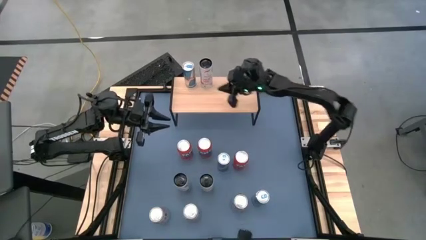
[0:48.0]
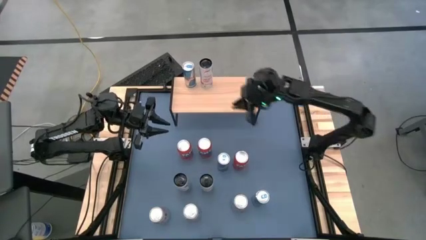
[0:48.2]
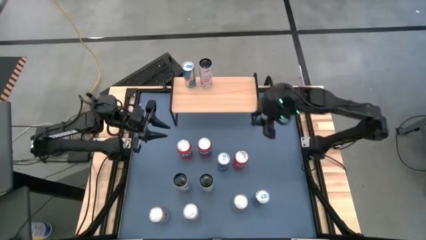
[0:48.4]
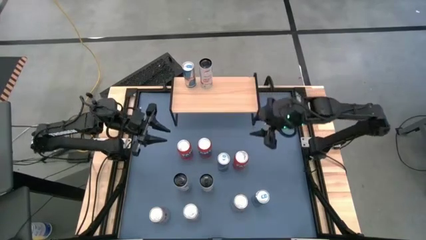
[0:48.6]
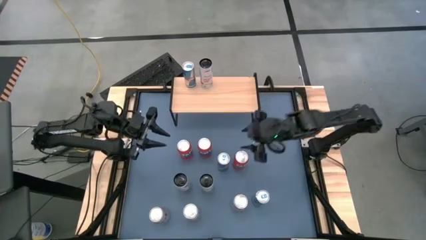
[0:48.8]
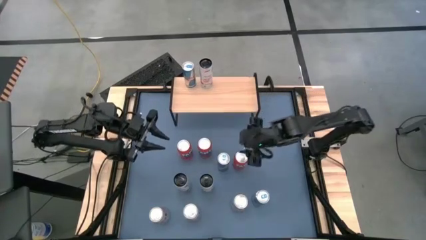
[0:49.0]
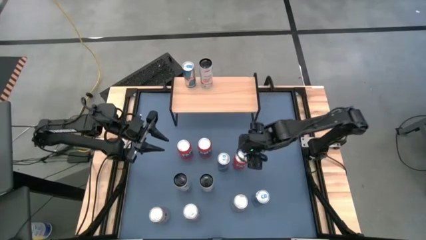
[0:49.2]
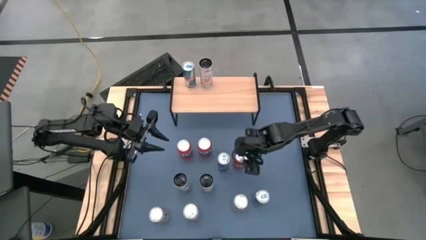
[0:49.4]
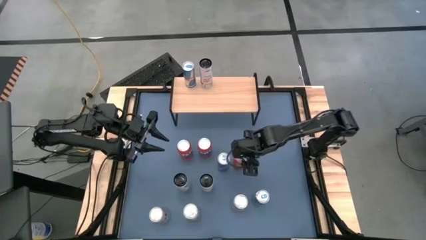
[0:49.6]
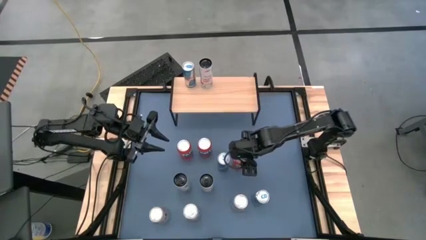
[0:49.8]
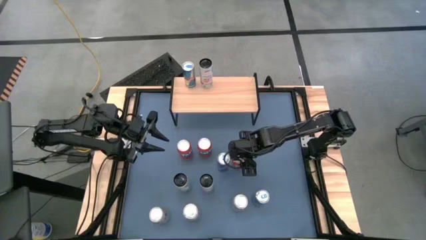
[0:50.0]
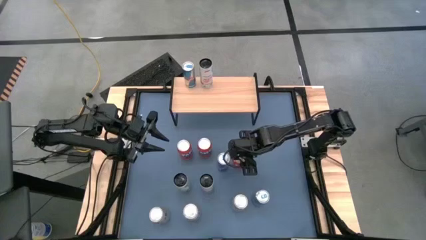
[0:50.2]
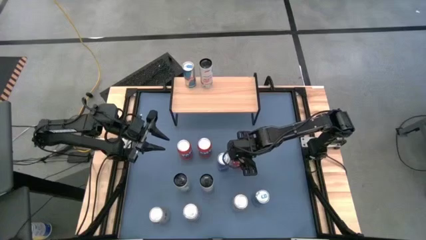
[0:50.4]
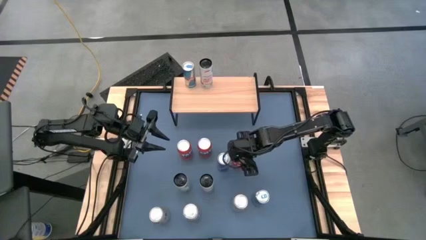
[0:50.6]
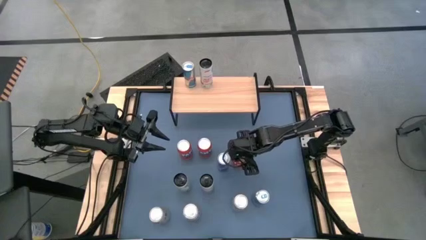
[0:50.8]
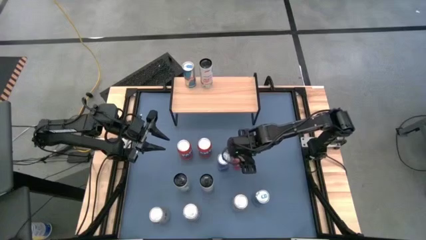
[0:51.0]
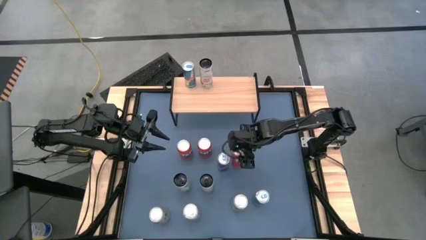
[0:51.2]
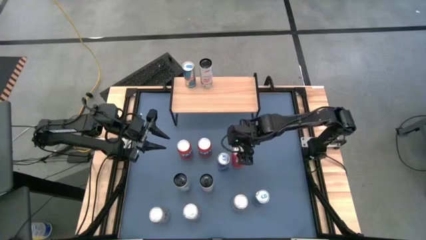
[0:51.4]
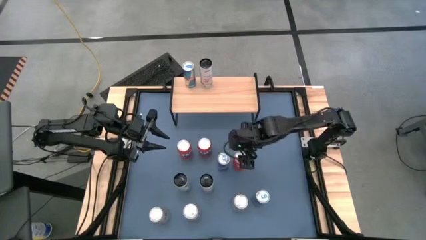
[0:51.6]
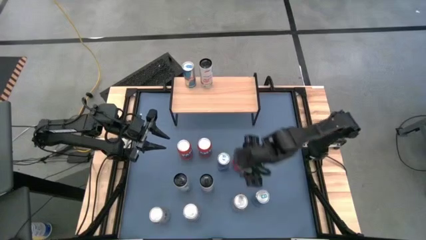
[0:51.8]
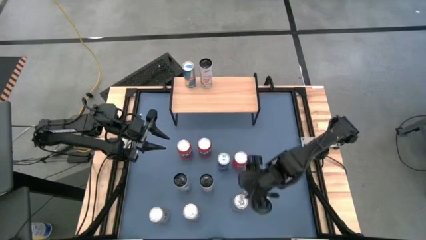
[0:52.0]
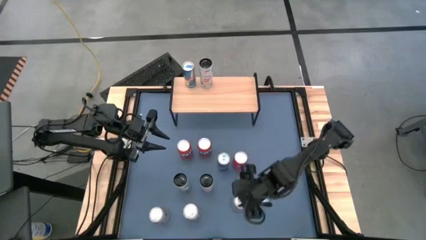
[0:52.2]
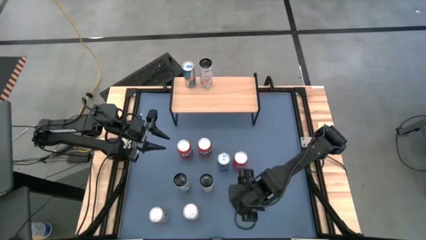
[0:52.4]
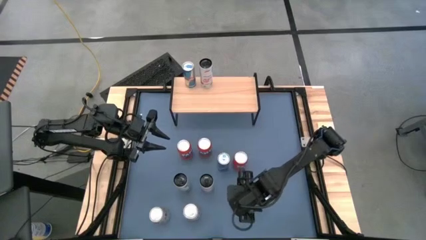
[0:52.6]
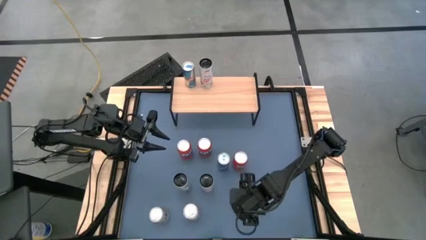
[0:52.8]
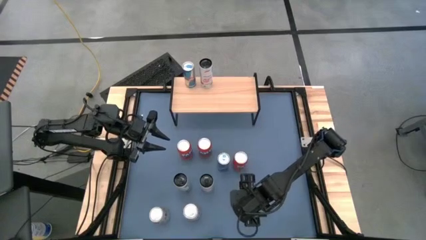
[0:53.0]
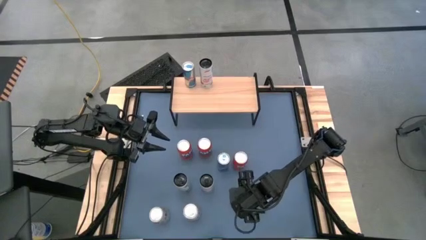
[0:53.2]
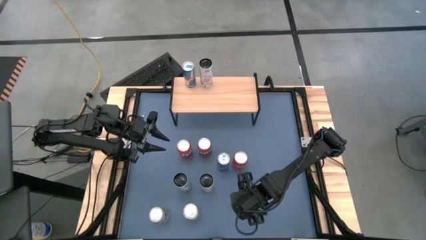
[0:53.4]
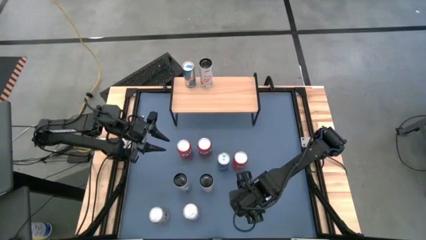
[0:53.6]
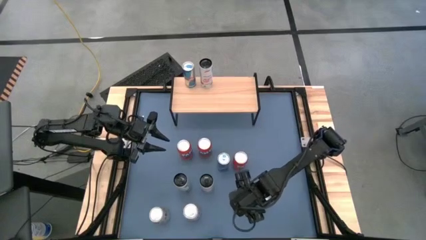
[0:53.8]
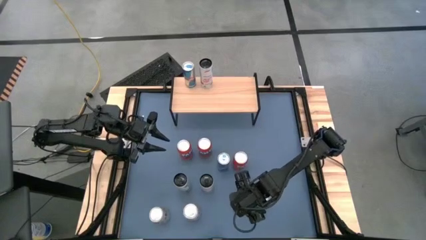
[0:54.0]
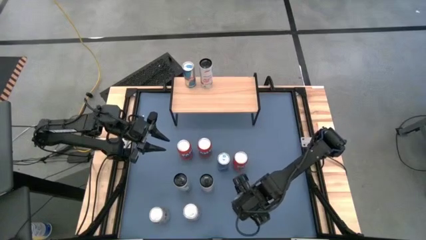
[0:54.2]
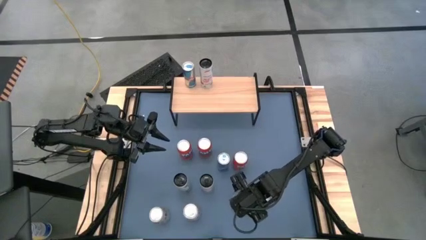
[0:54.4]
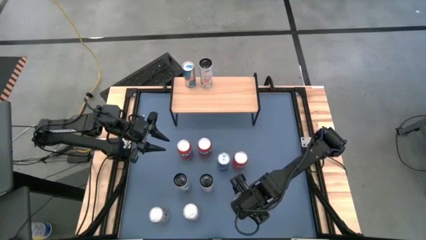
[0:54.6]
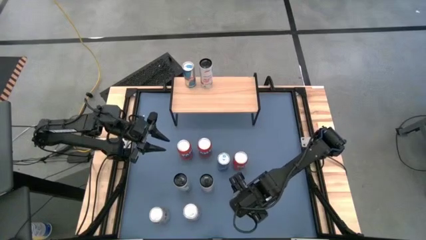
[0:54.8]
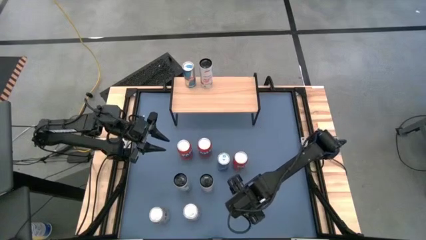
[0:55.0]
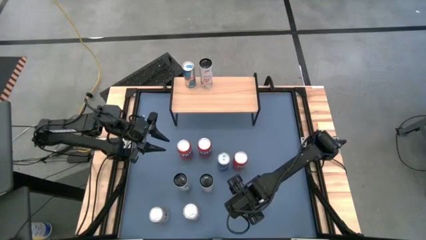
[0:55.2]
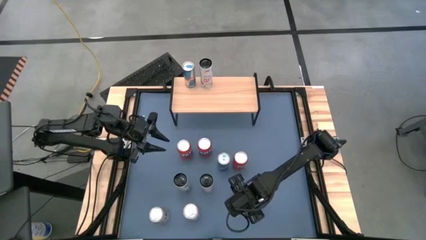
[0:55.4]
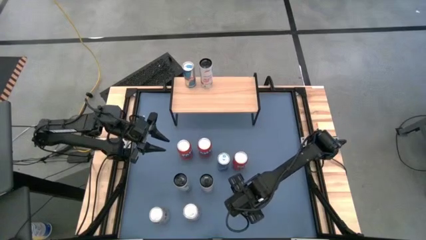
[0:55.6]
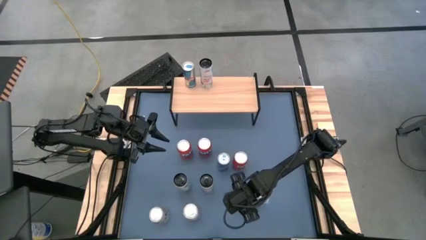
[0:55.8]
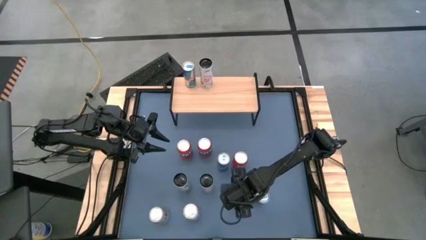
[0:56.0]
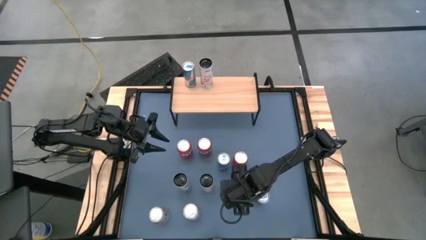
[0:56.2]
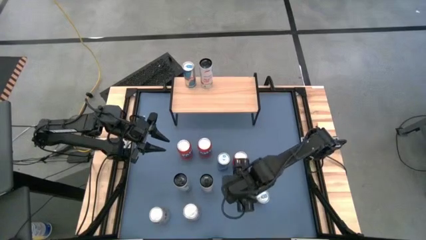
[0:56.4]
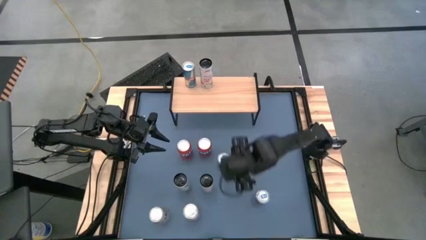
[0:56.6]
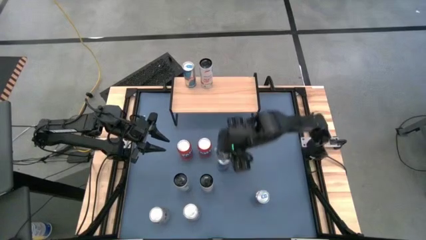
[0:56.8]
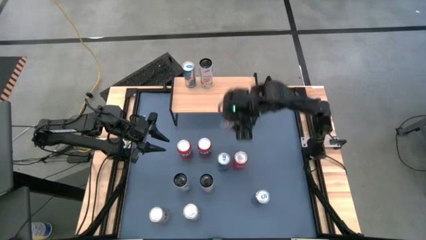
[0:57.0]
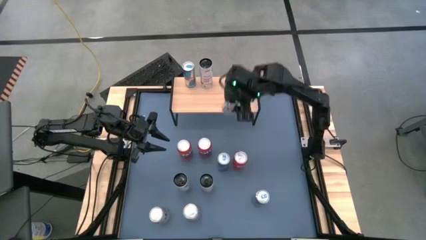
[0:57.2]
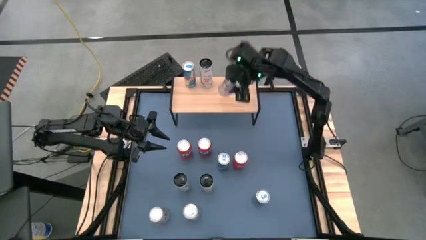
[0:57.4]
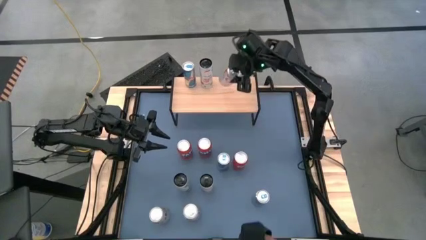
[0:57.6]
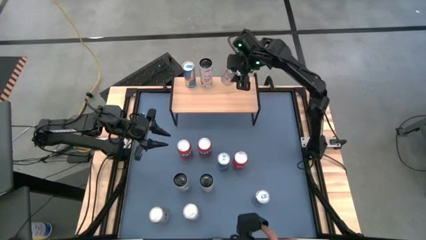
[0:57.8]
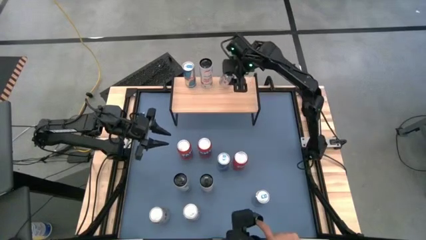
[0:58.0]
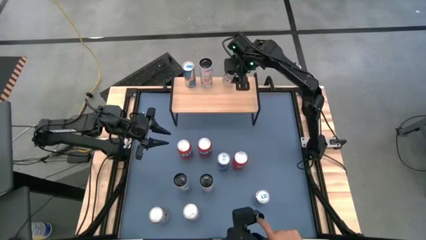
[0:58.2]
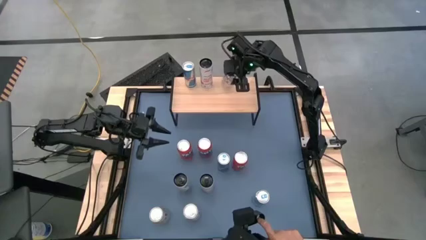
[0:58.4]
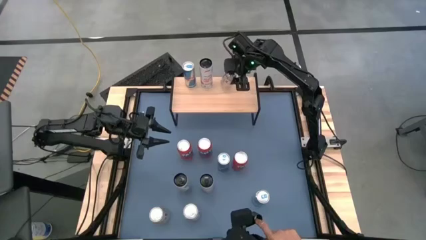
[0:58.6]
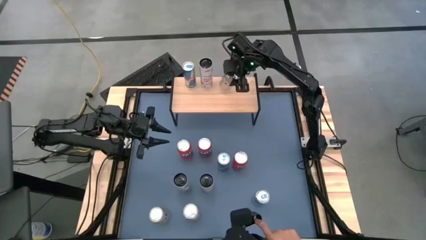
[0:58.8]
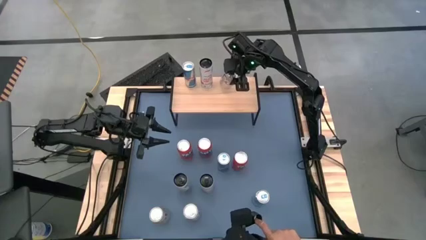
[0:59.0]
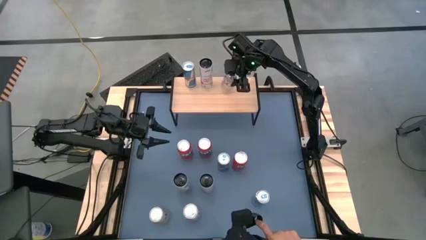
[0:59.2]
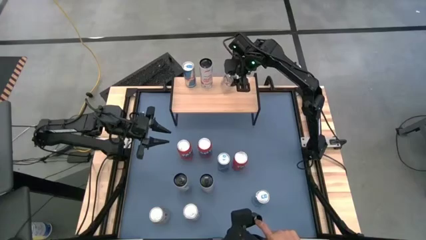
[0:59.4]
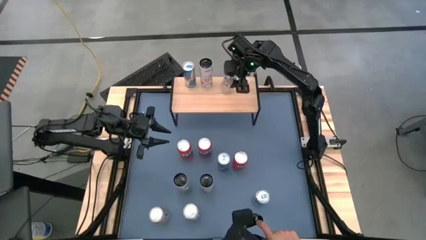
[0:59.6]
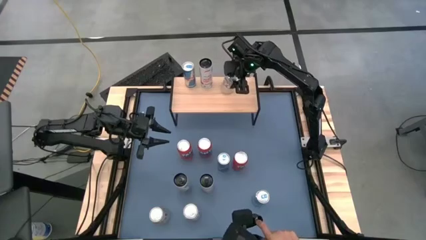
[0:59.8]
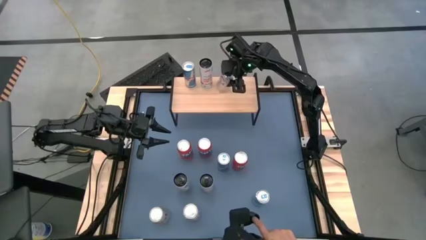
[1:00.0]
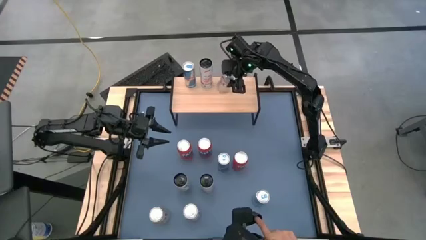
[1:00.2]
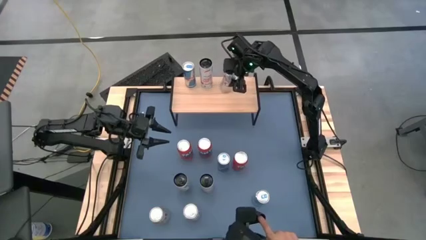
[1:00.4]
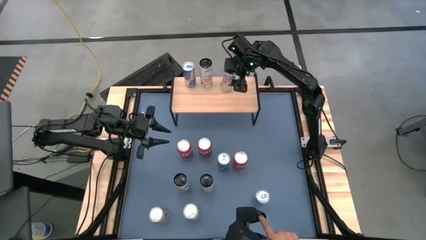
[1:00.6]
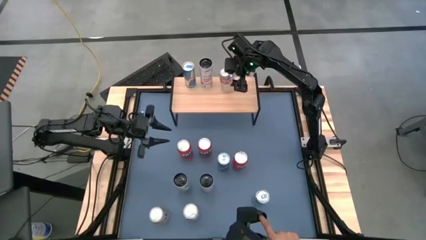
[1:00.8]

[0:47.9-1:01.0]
Task: Place canned beverage on shelf
Put the right silver soda can on the shelf
